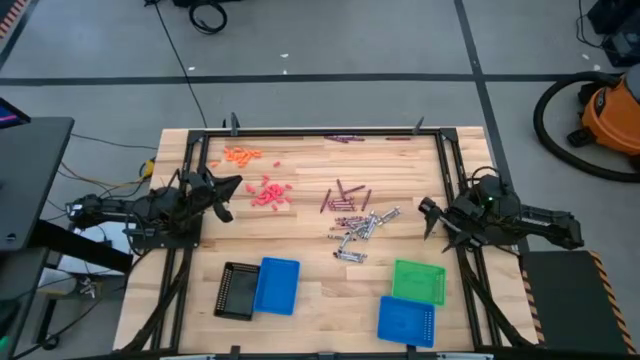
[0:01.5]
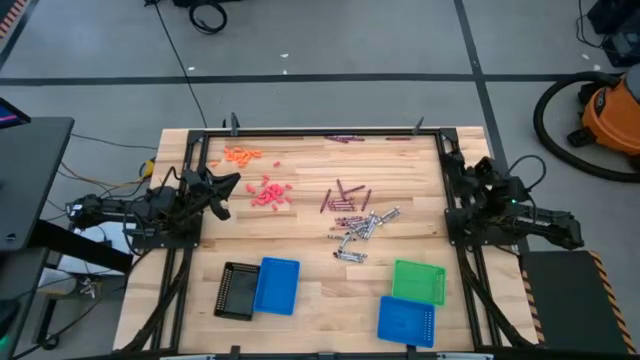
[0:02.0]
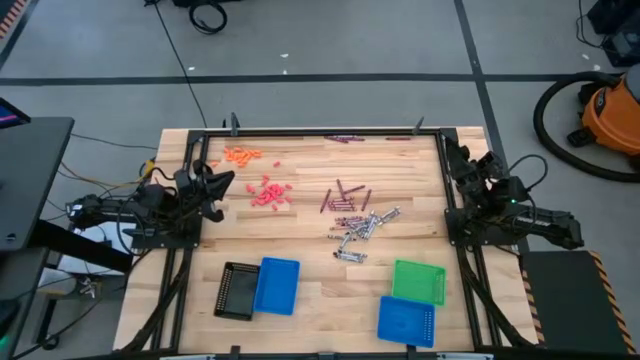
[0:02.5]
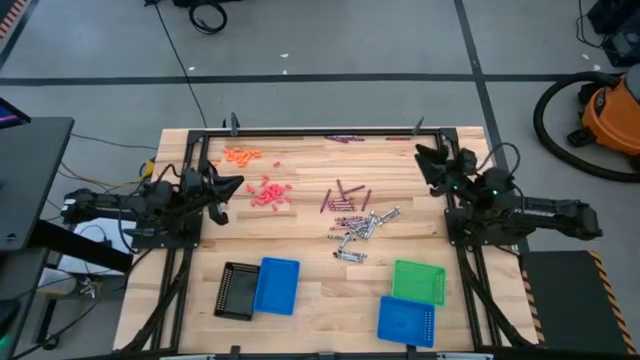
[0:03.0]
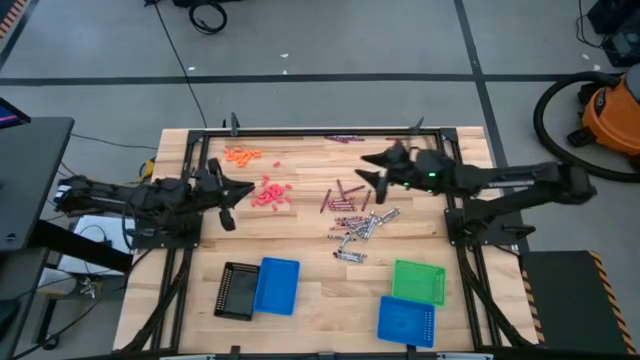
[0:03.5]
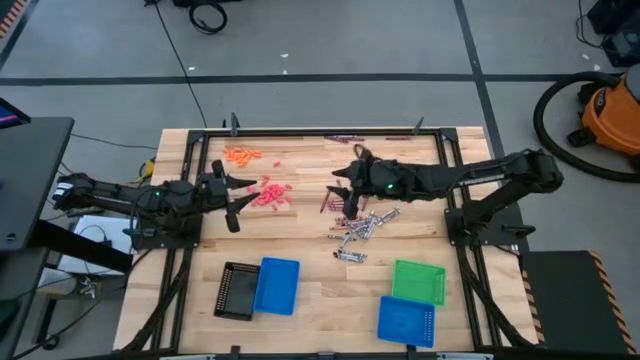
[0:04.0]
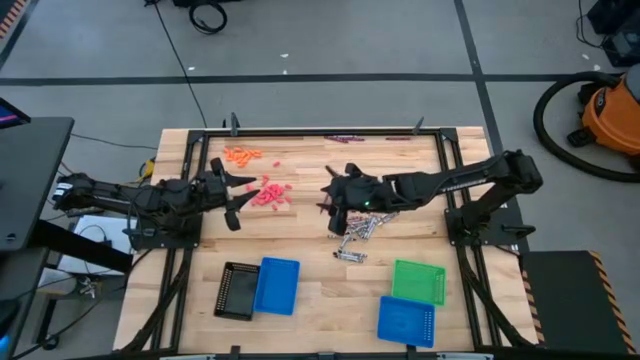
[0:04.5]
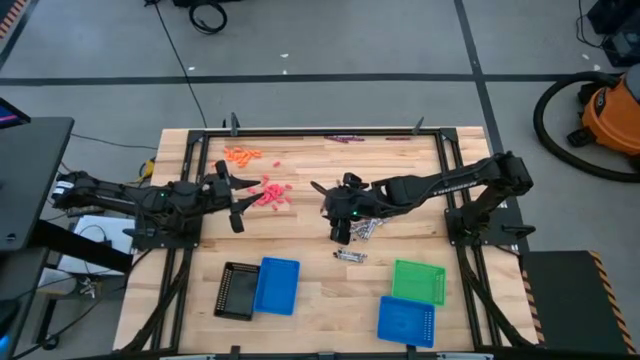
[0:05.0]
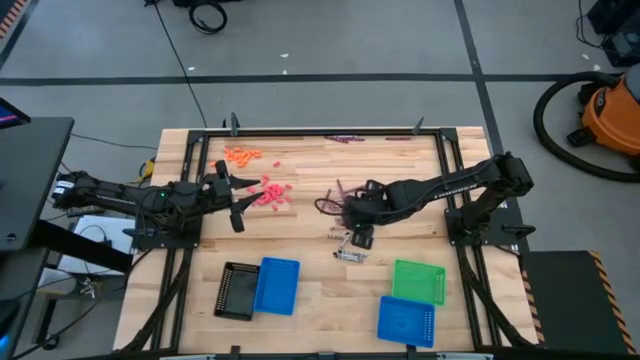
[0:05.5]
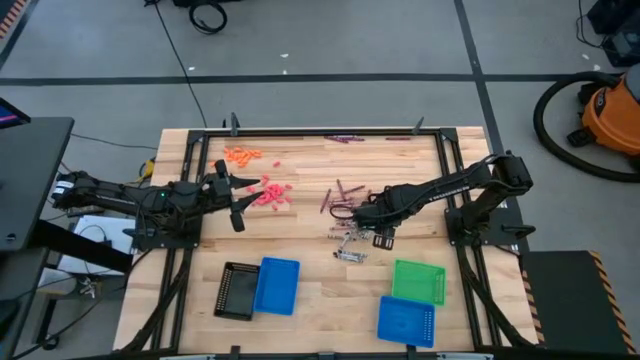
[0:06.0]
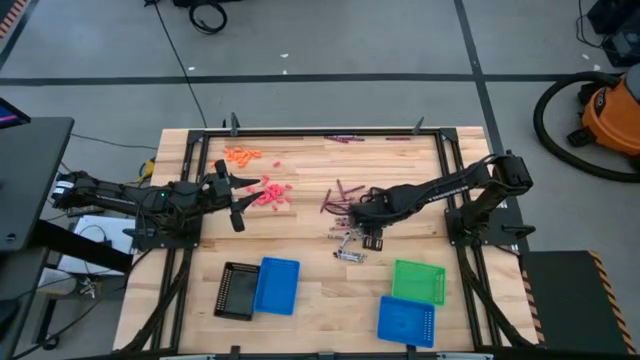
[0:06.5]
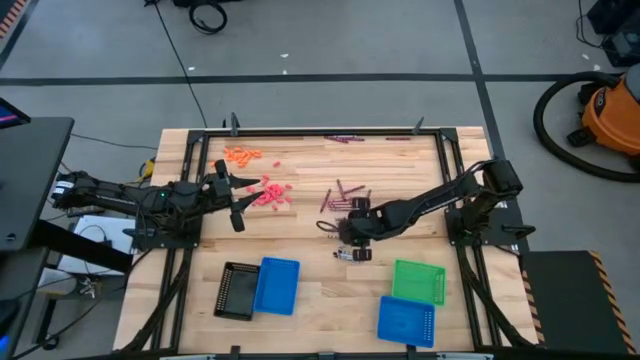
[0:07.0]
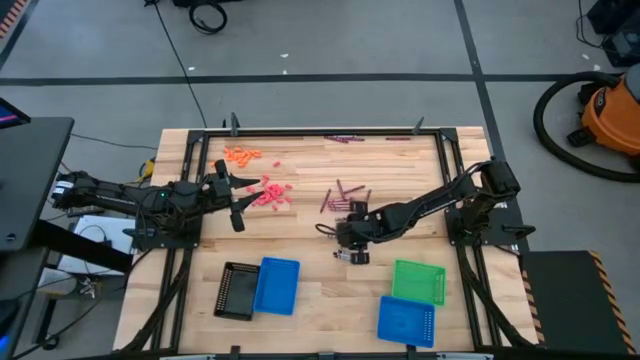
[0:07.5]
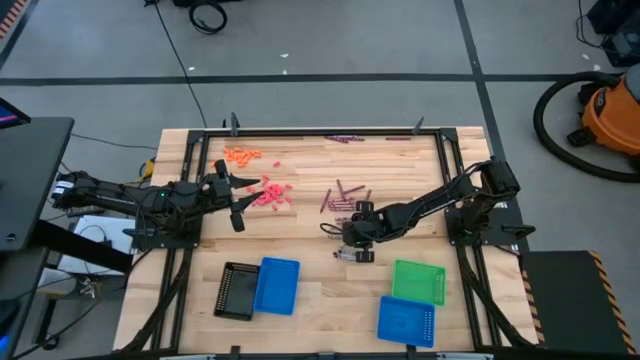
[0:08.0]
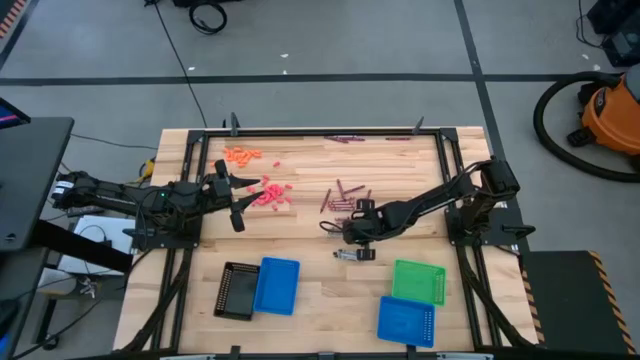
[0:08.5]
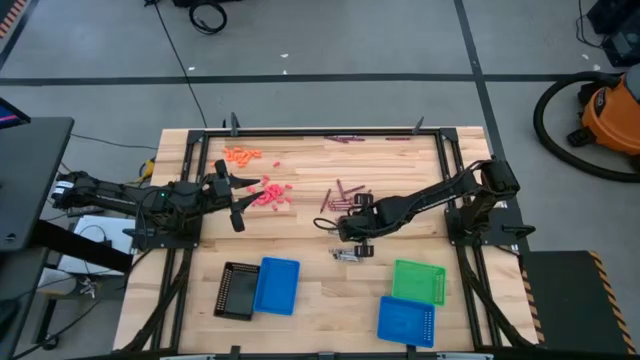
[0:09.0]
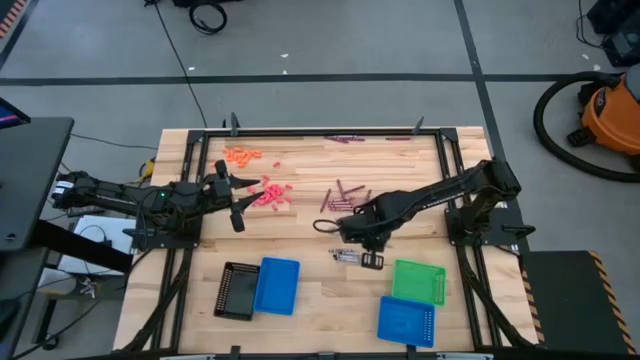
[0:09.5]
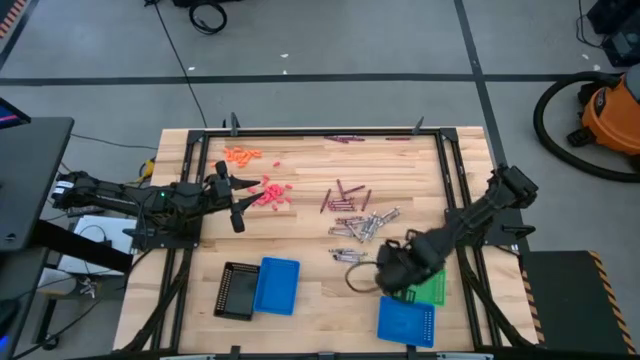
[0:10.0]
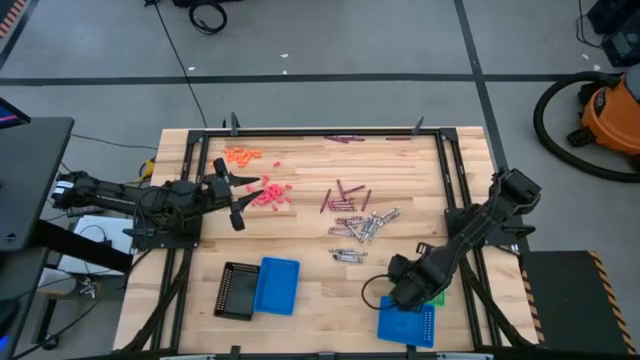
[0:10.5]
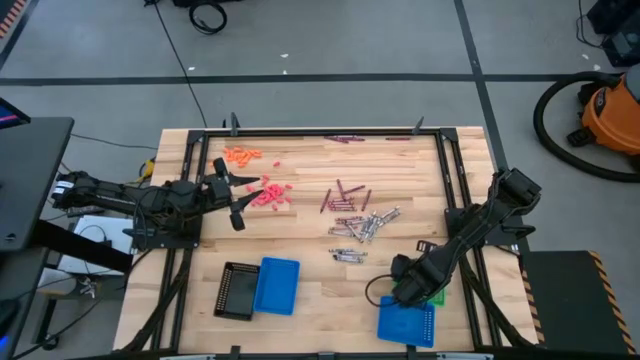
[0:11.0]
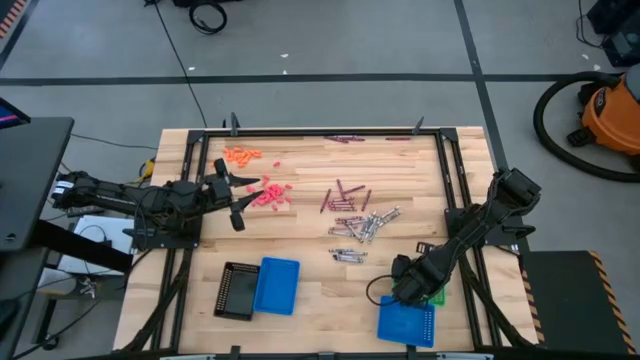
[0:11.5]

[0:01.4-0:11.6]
Task: Sort crayons
Put the black crayon into the green bin

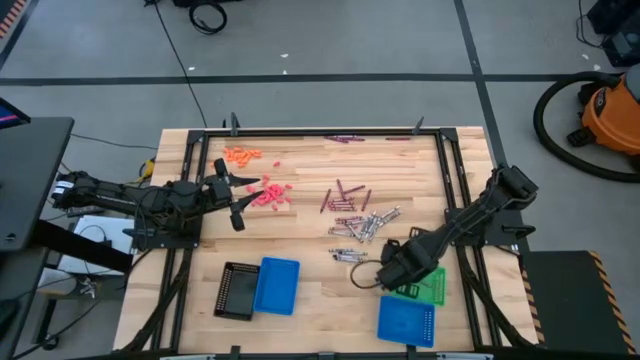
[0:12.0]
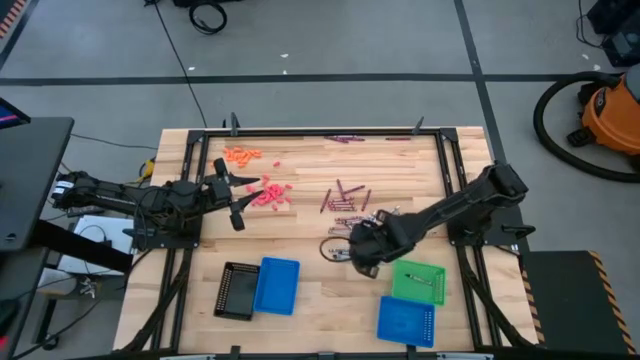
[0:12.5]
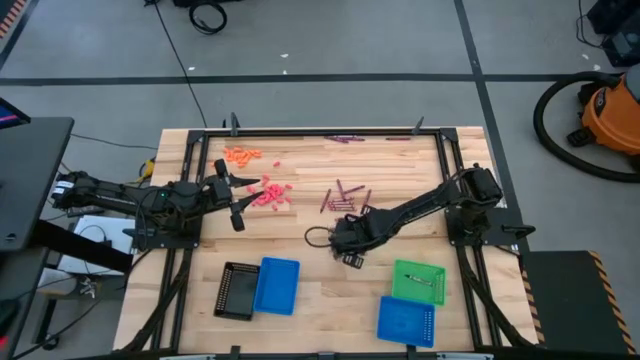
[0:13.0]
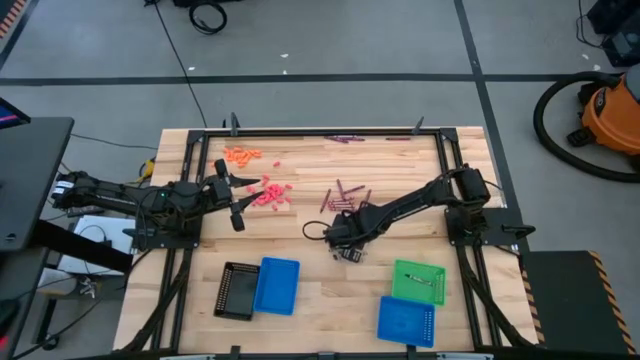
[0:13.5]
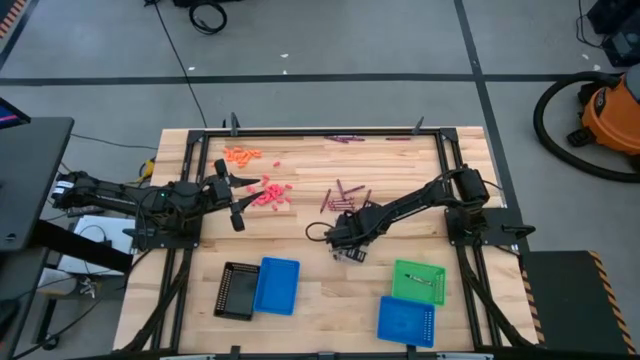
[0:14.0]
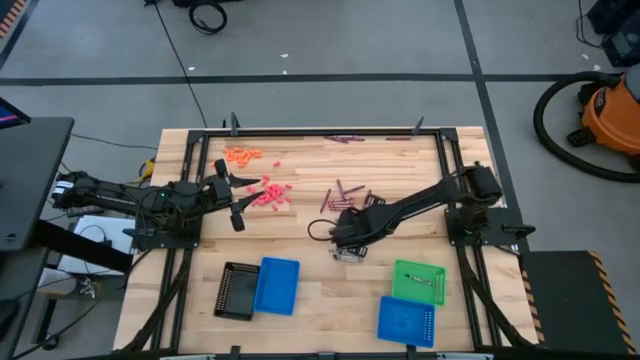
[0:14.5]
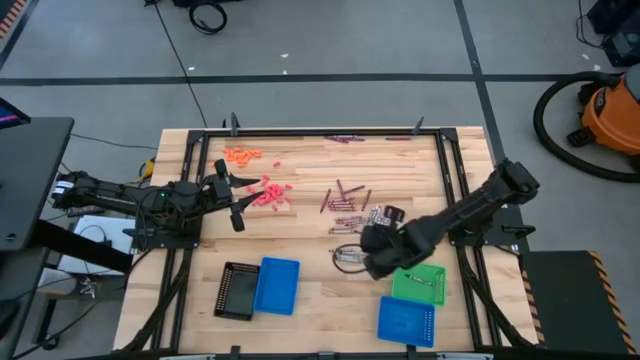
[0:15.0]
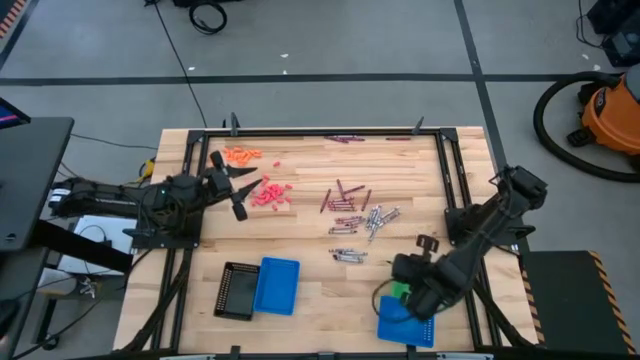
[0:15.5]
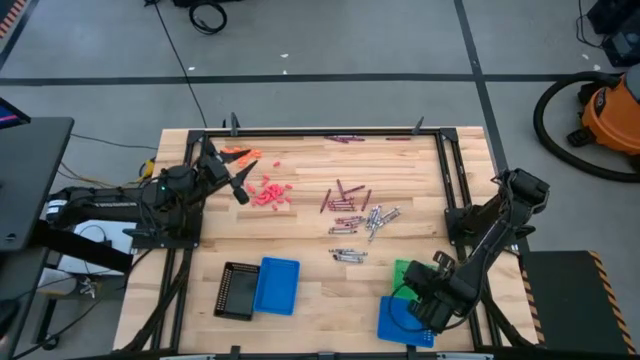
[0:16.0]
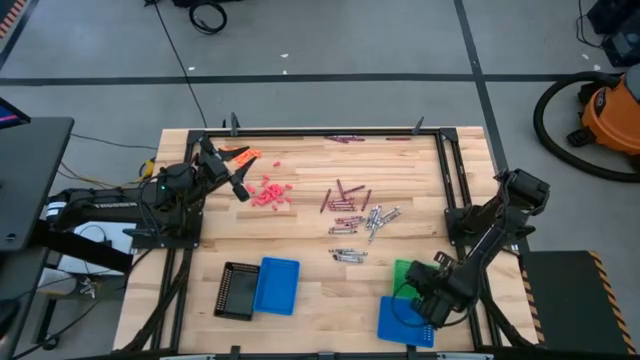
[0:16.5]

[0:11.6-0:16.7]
Put the black crayon into the green bin

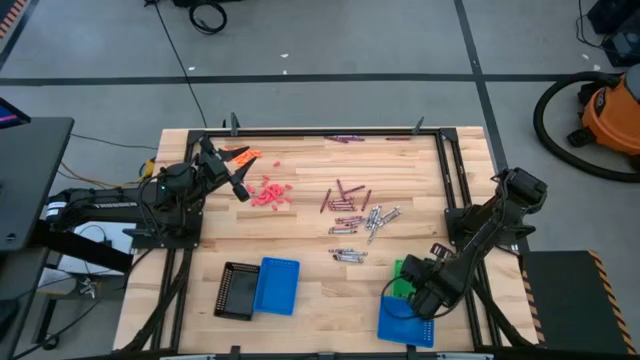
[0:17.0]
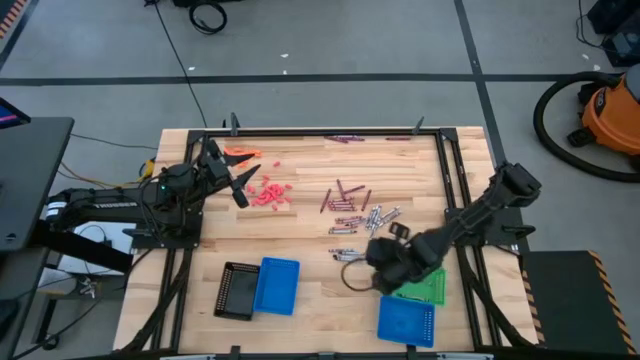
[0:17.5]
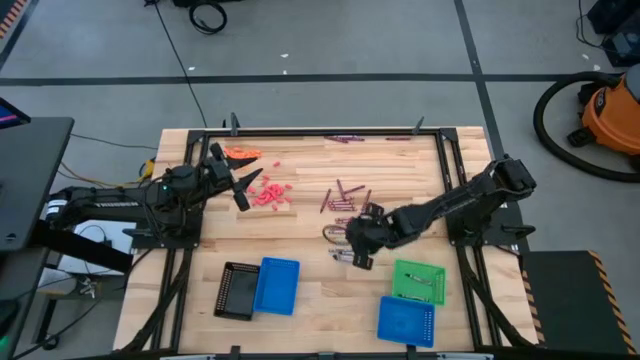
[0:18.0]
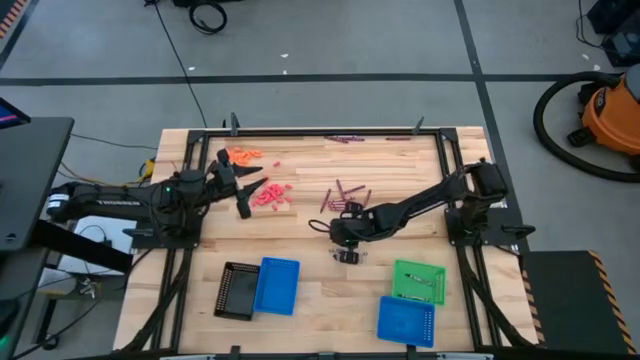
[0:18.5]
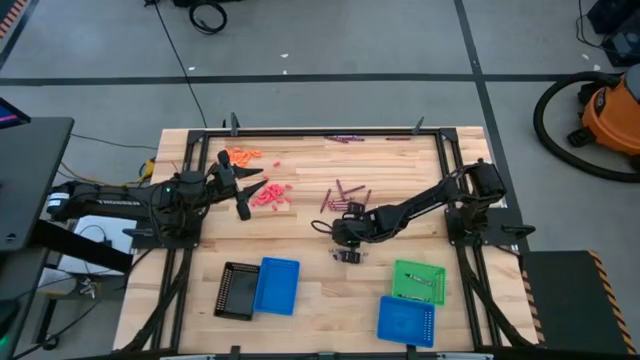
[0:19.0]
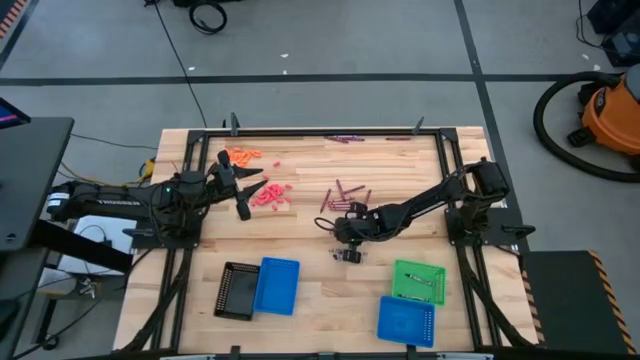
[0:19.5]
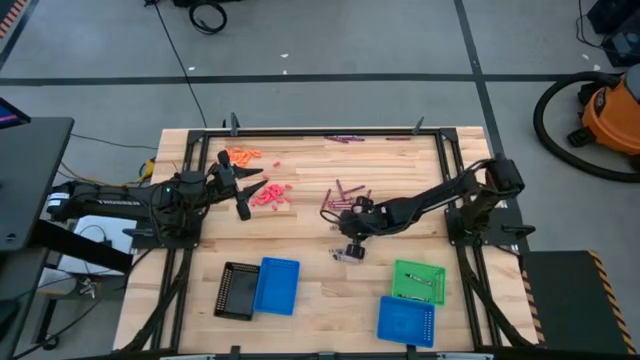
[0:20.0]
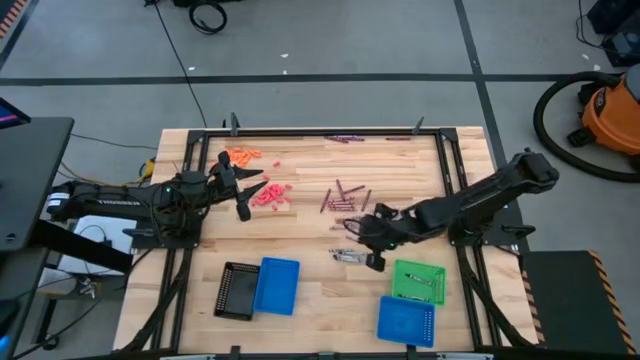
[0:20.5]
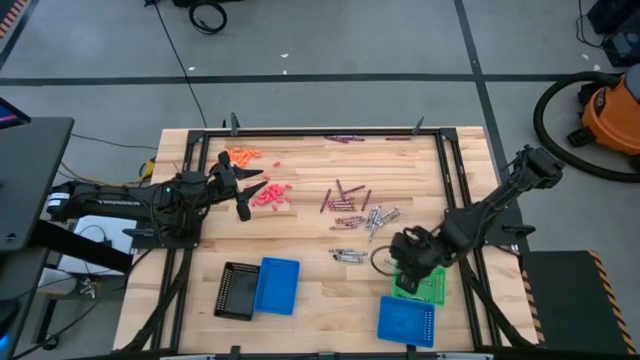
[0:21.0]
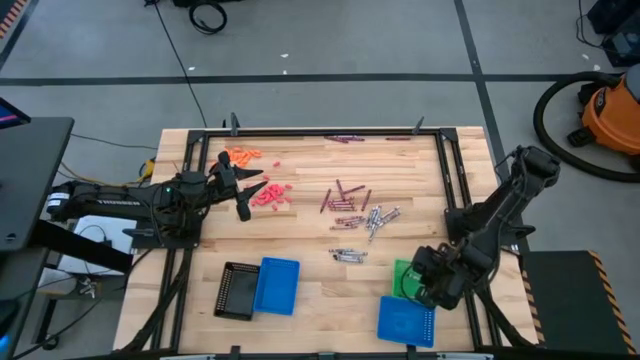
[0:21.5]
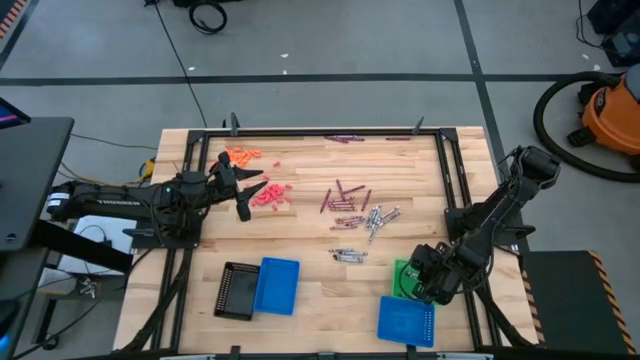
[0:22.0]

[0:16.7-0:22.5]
Put the black crayon into the green bin

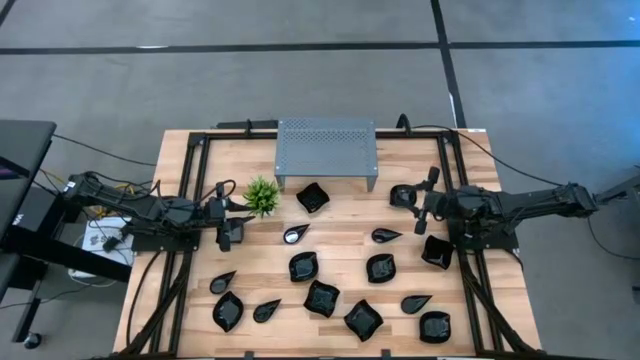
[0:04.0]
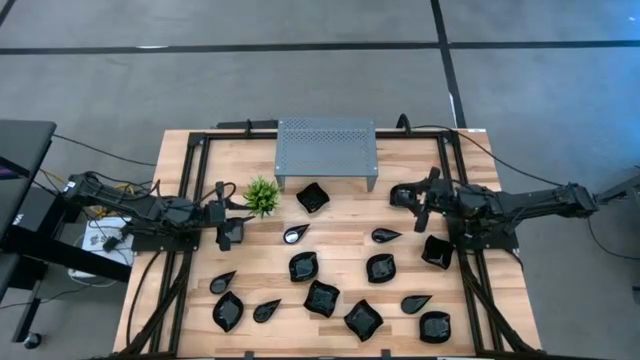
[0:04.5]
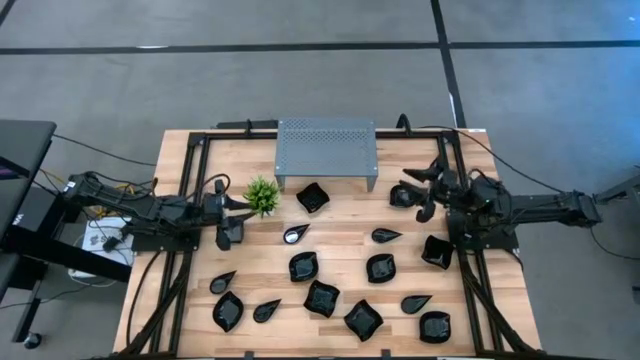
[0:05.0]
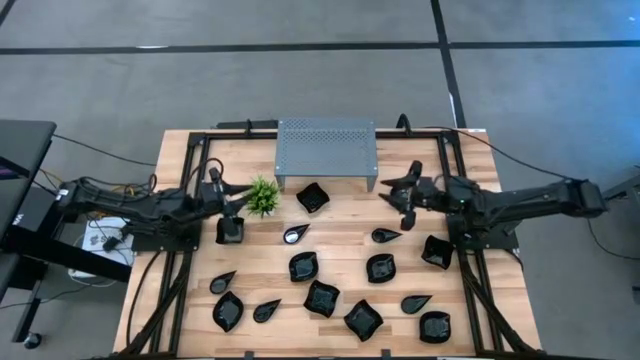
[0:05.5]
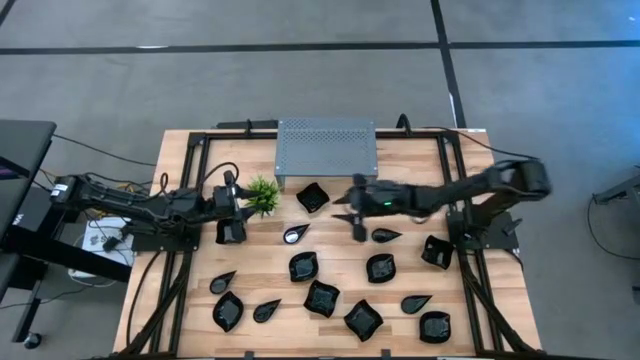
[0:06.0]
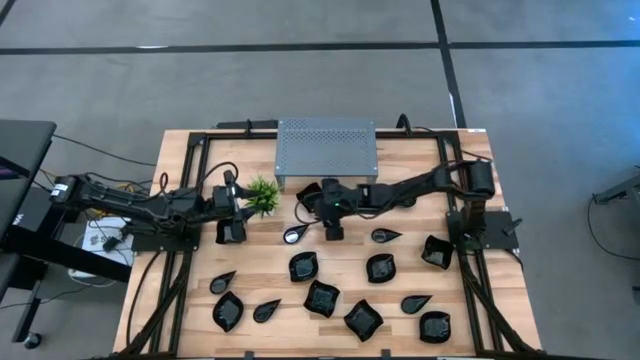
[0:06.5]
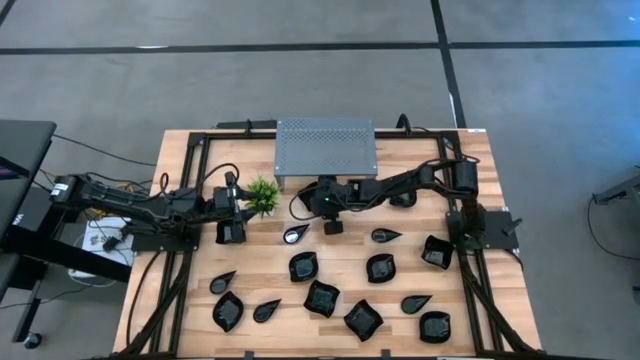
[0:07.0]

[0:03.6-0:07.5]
Task: Pick & Place Mini shaped plates
Put the black distorted square plate on the shelf
